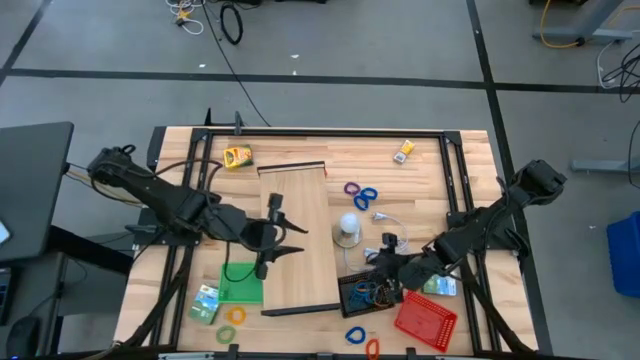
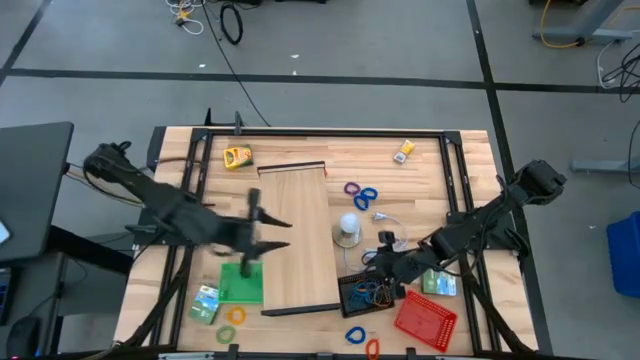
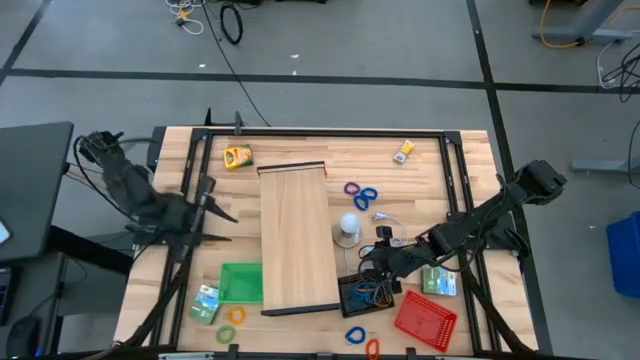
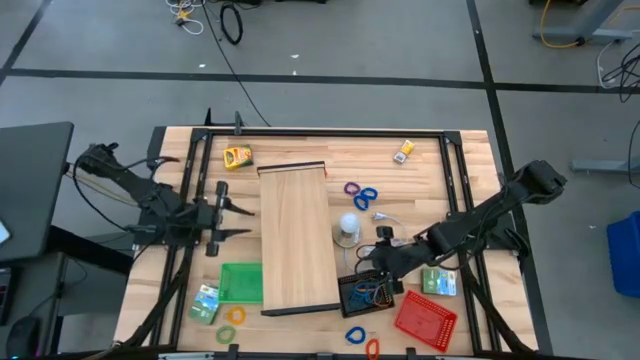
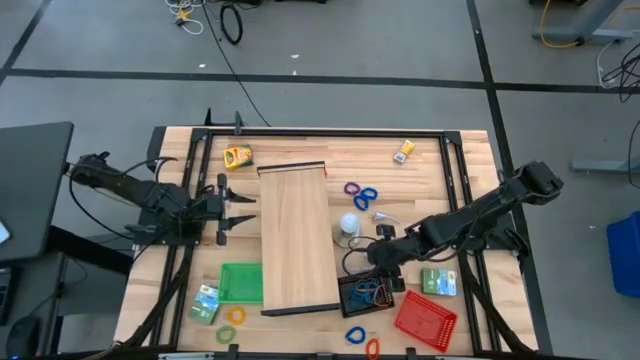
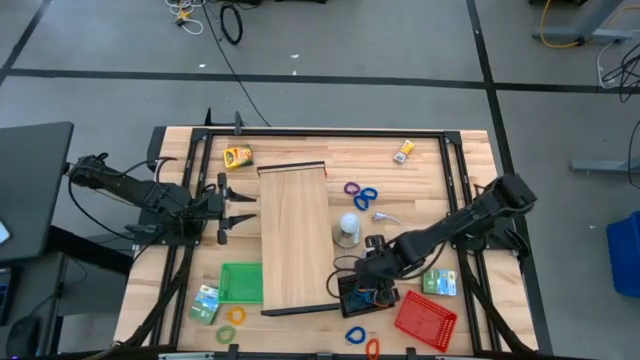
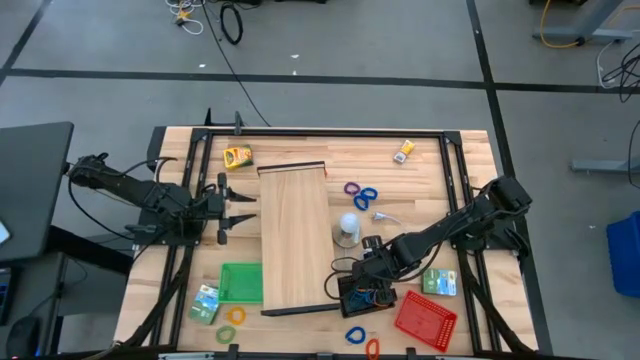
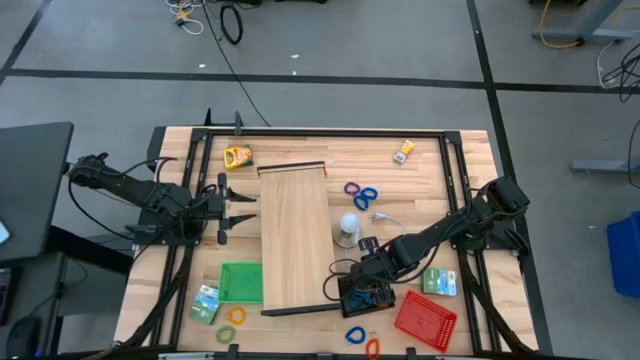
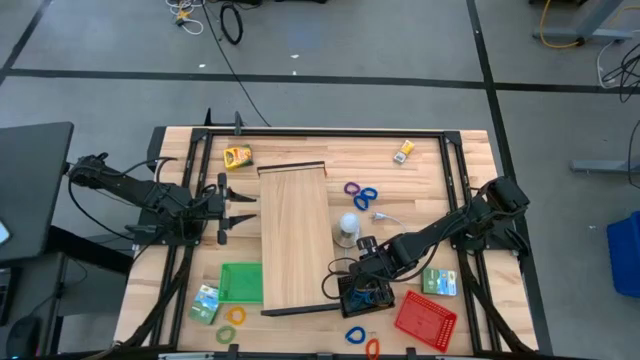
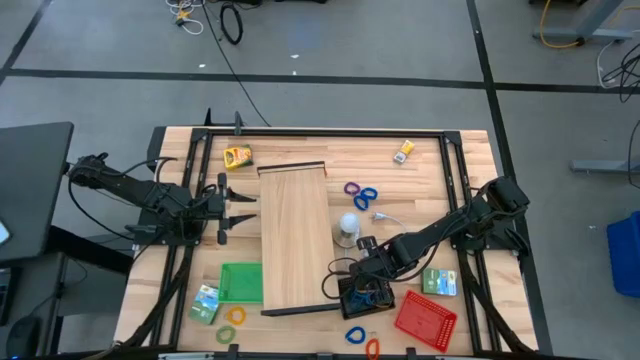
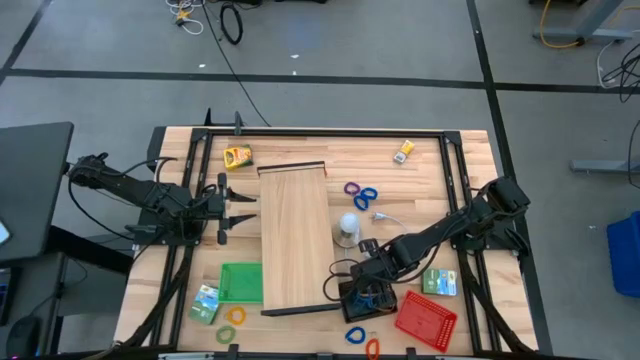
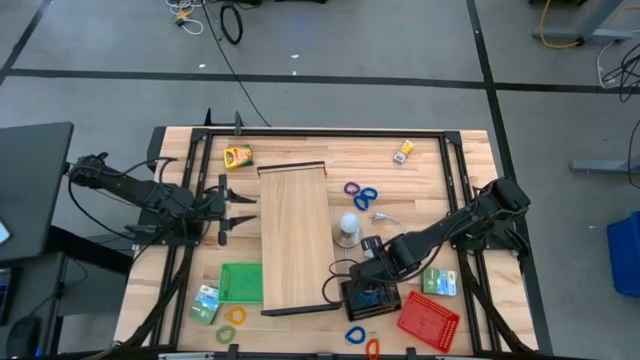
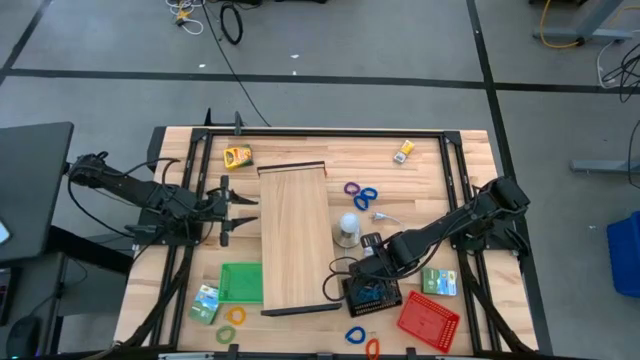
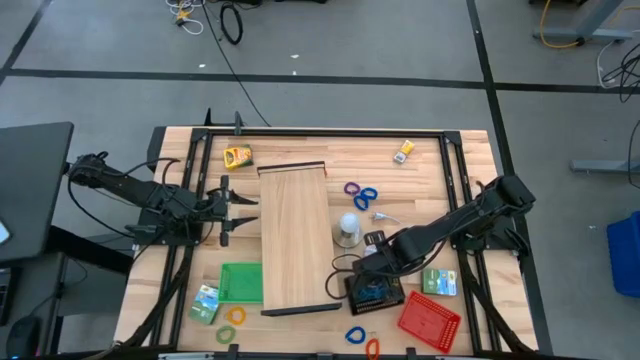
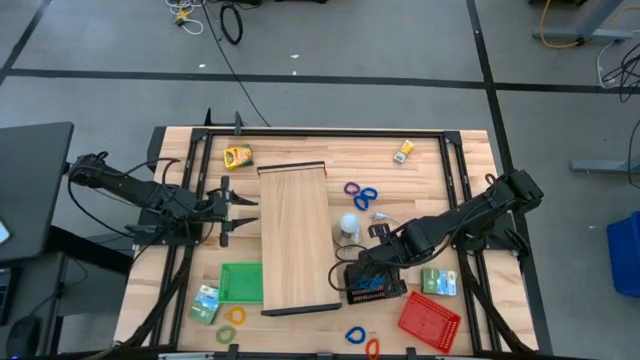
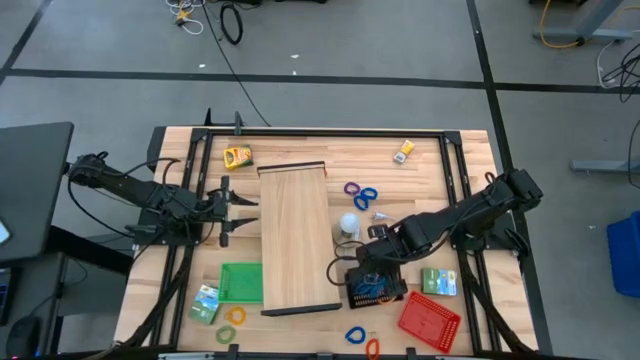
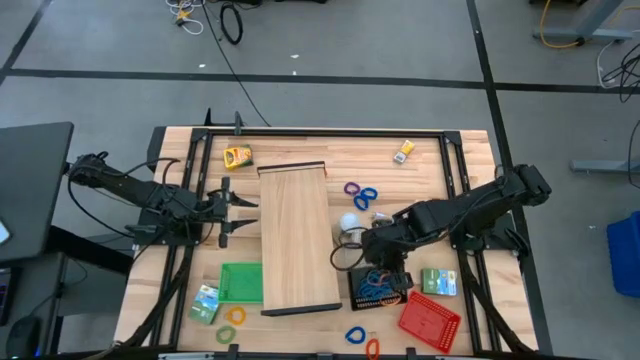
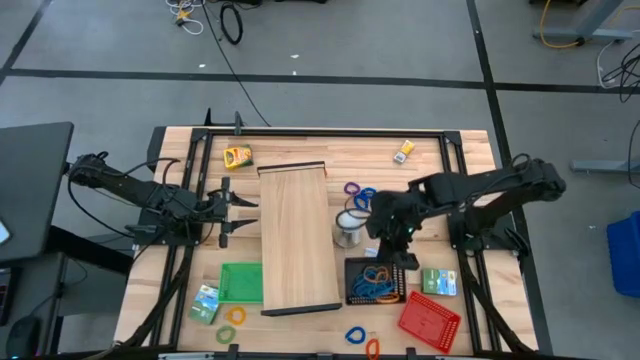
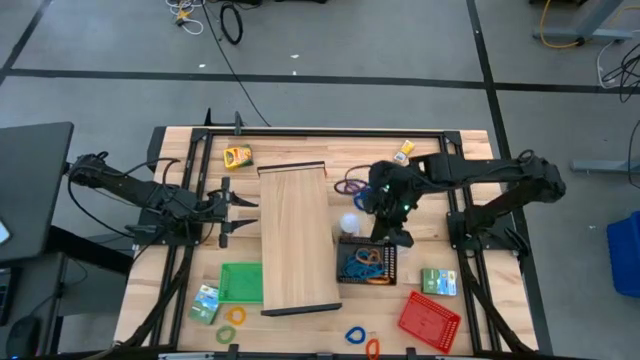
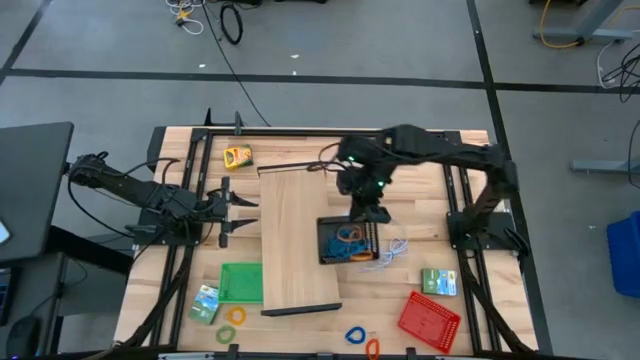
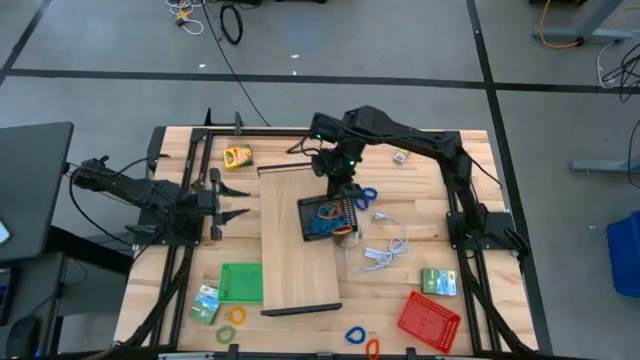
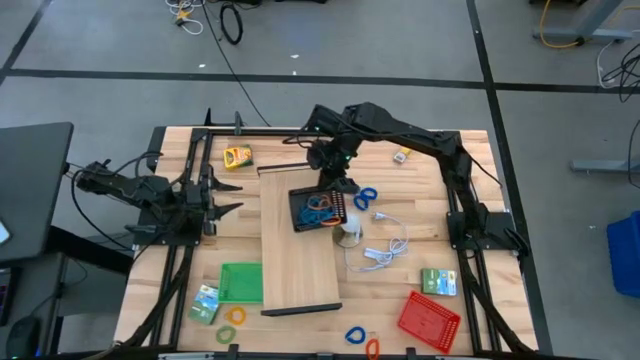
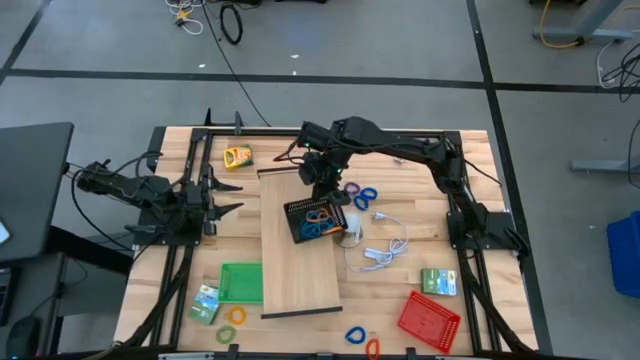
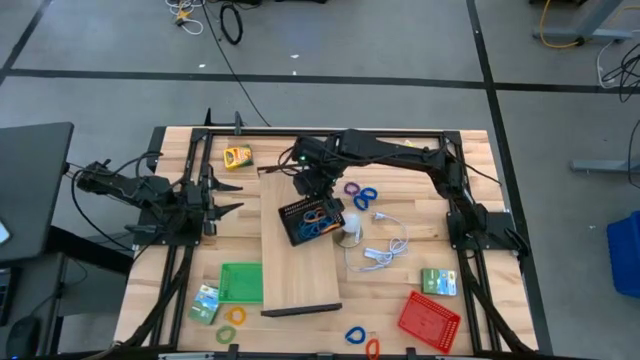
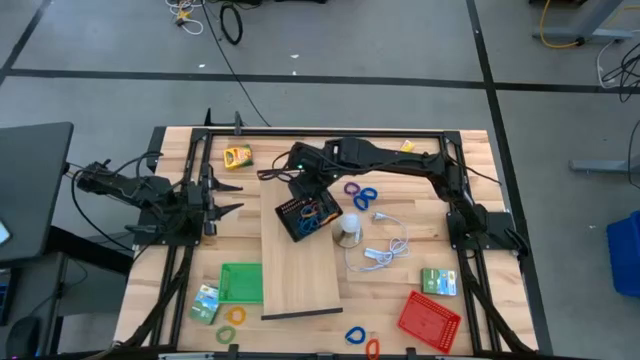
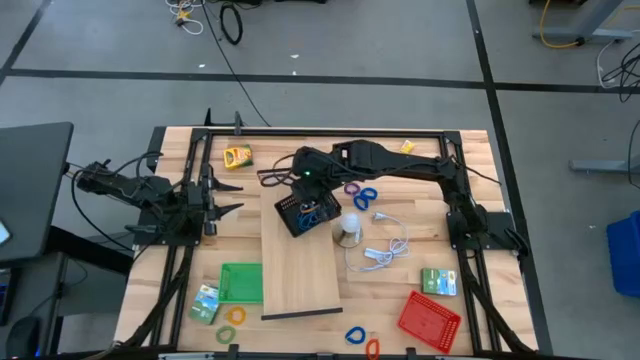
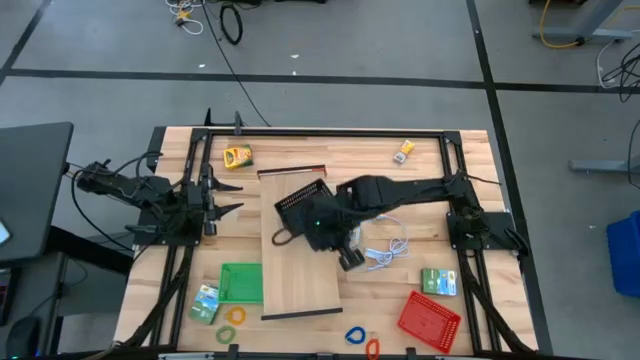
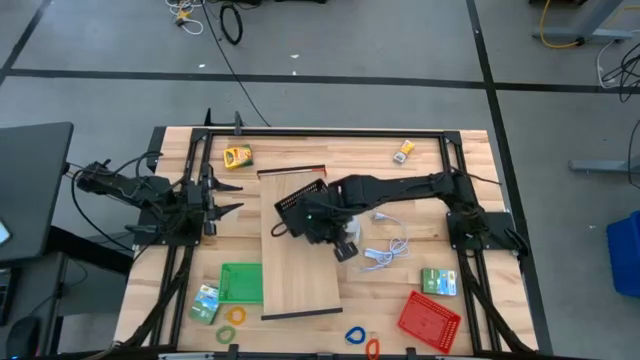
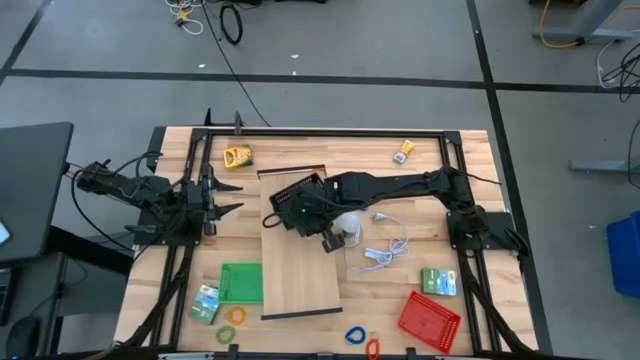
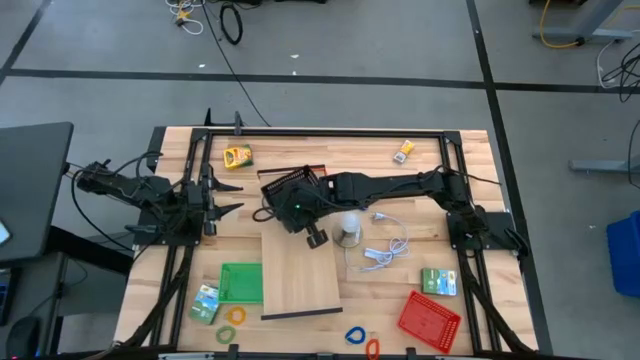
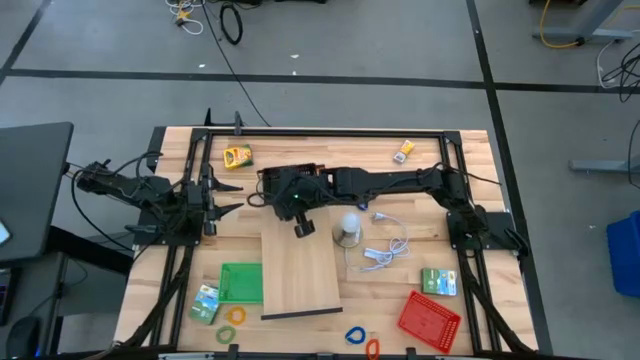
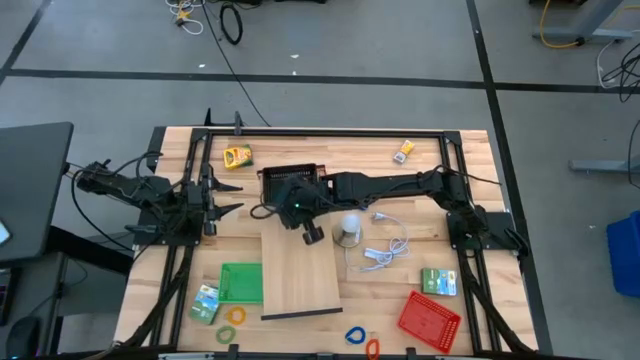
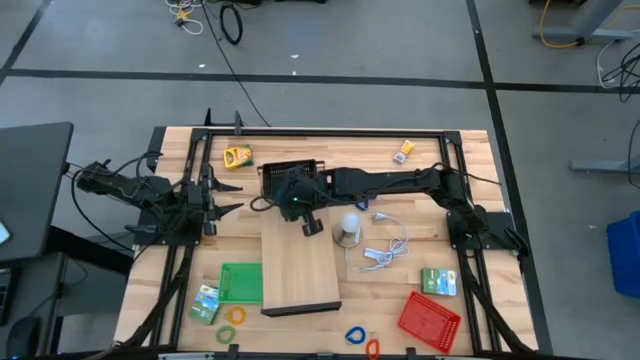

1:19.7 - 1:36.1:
Task: Pick & Place Office Desk Supplies
Put the black bin on the shelf

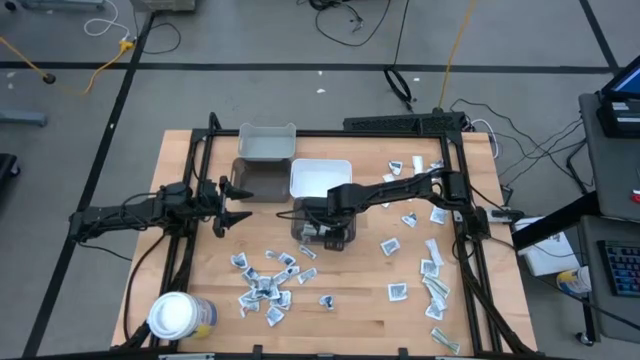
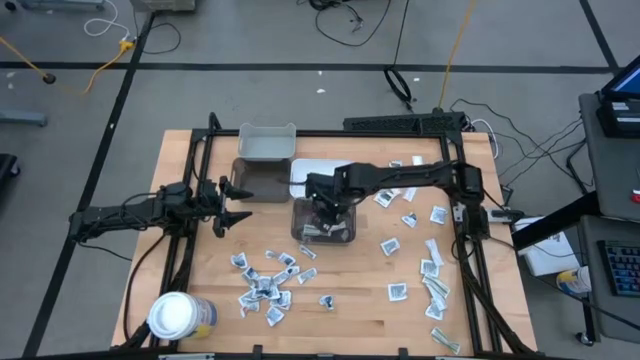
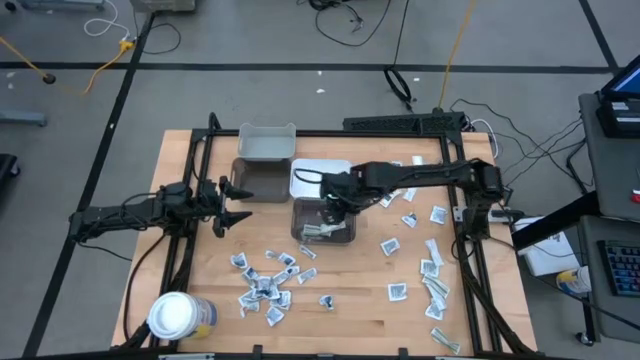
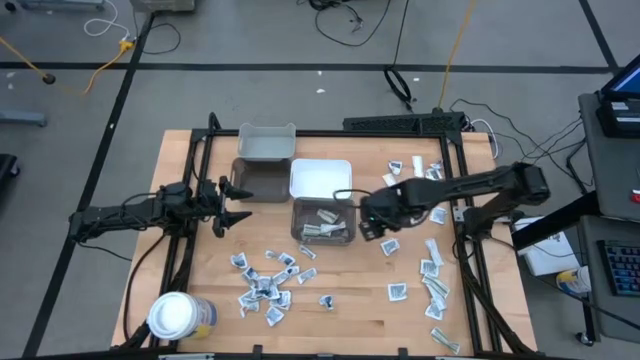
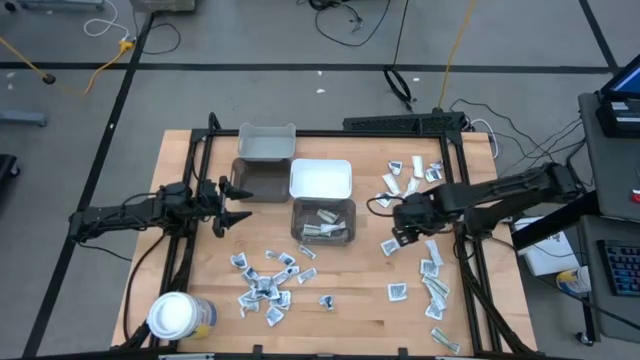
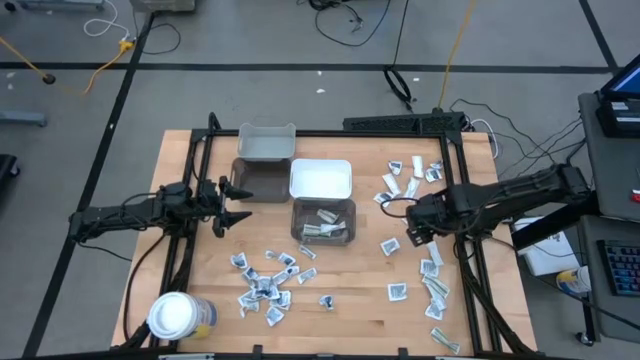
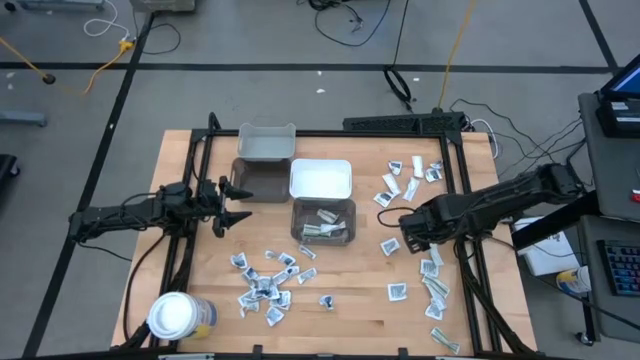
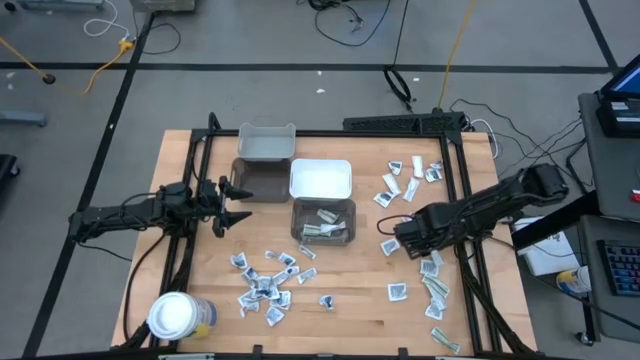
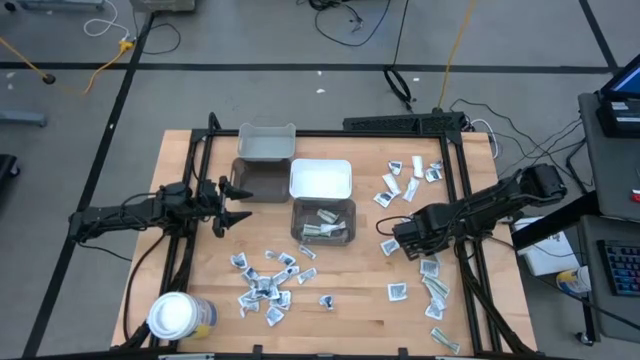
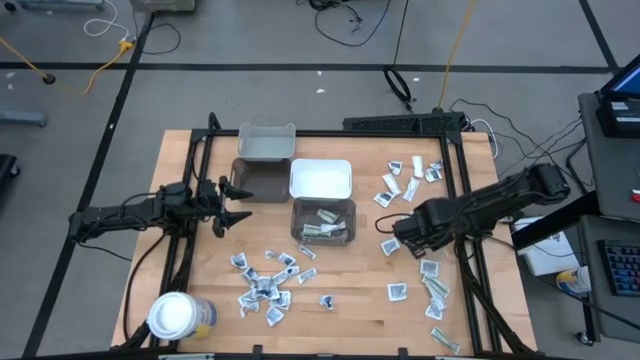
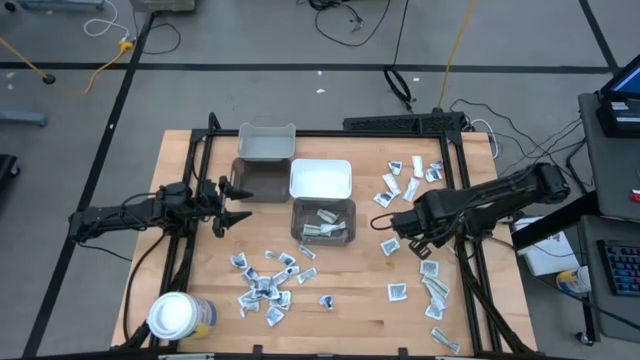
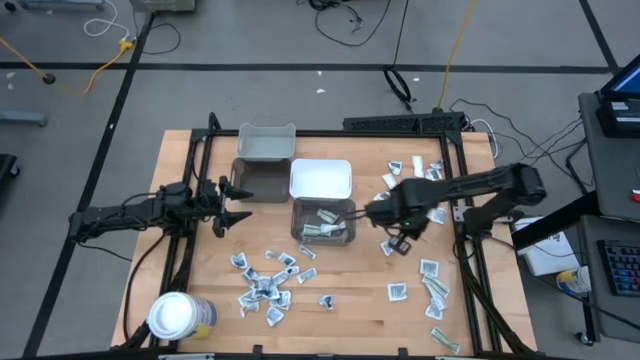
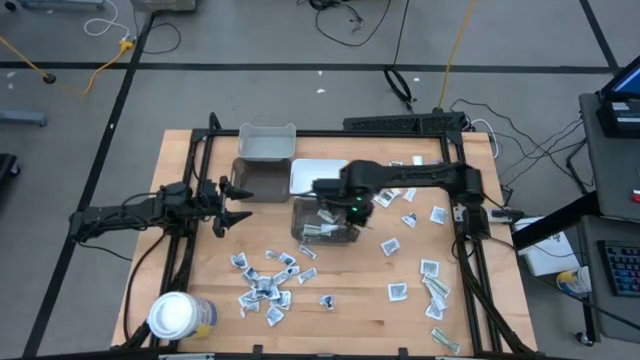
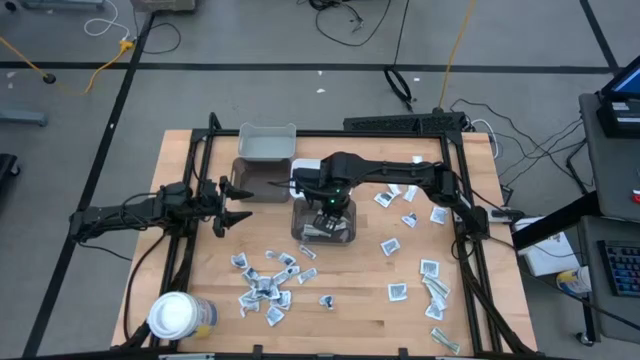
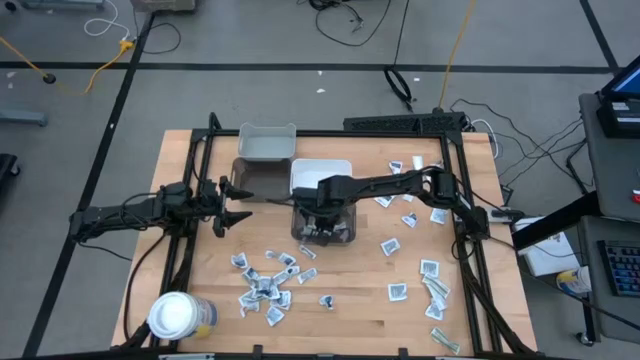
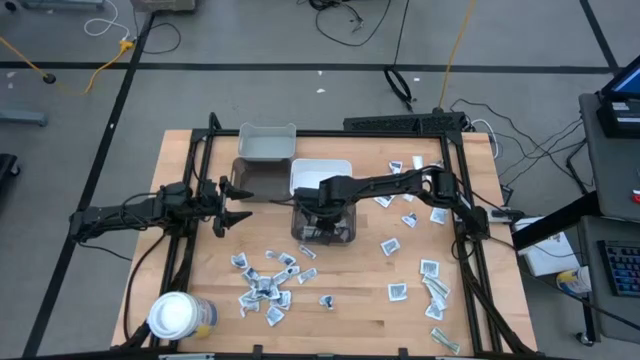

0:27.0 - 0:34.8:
Task: Pick & Place First Aid Supplies
Put the green bandage pack into the right black bin
